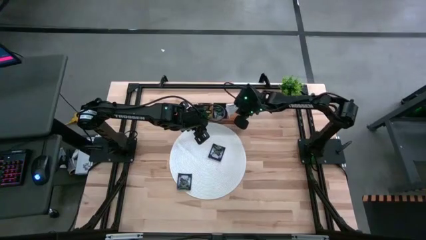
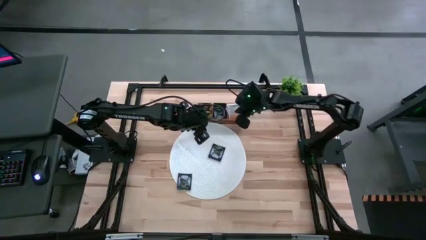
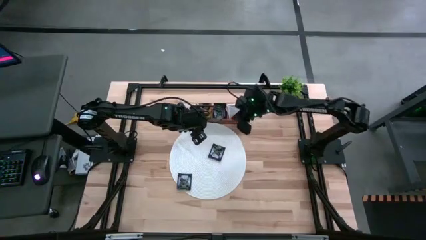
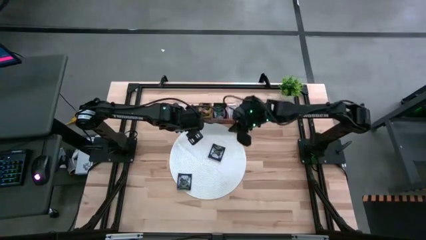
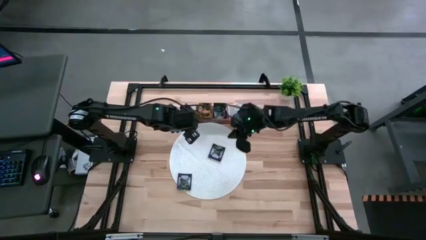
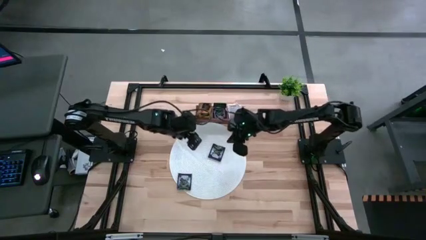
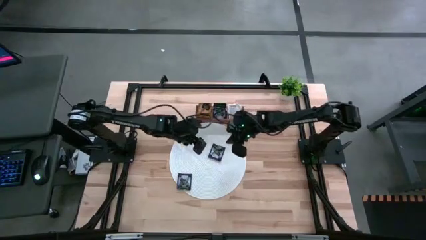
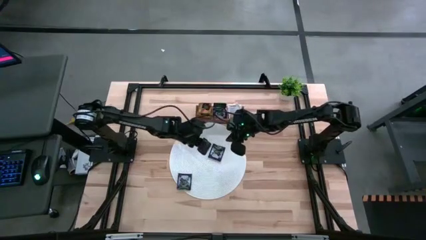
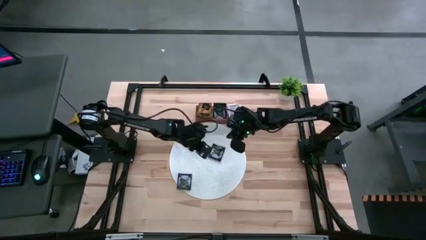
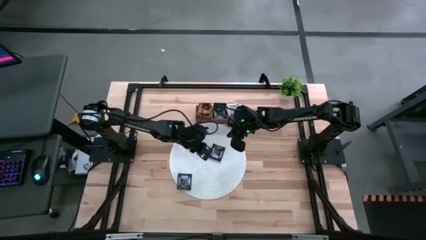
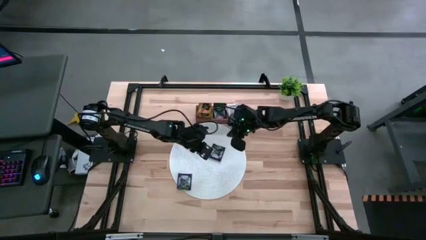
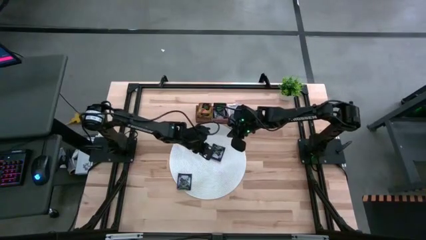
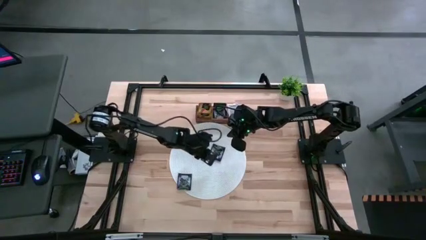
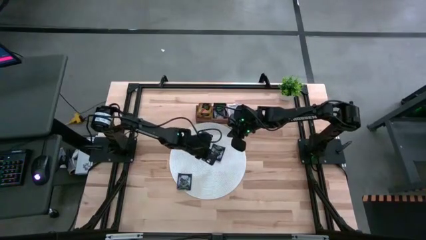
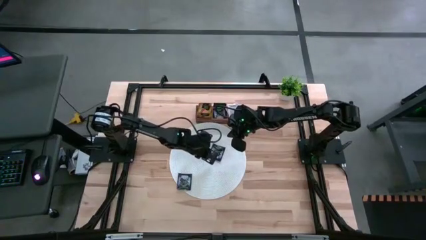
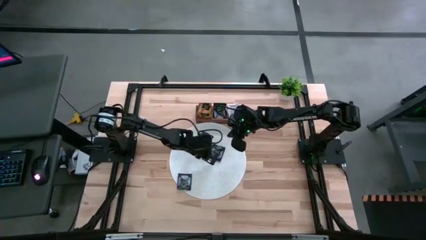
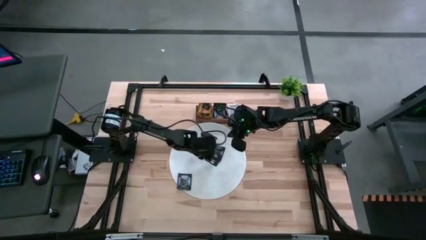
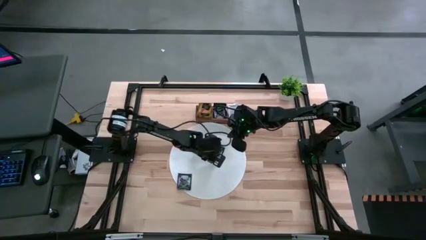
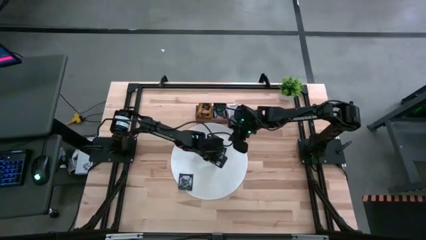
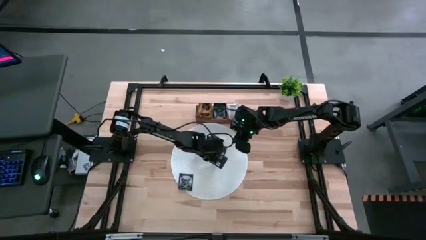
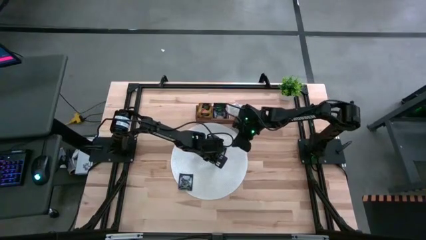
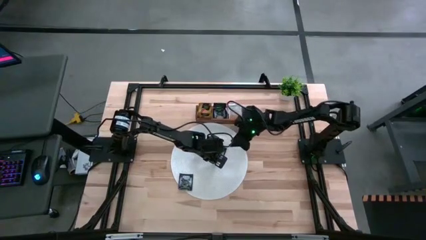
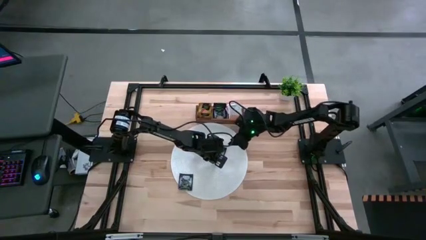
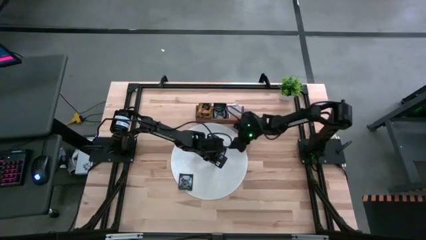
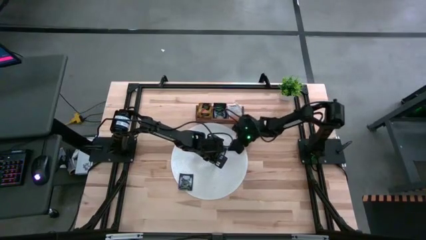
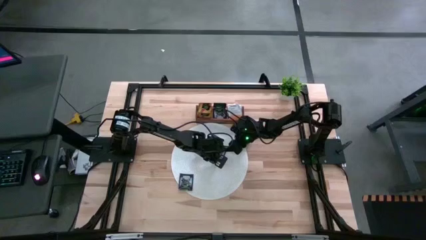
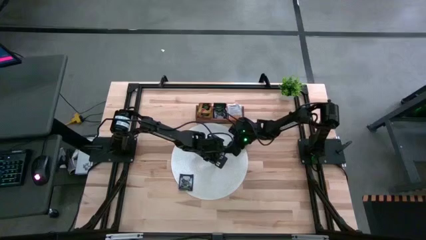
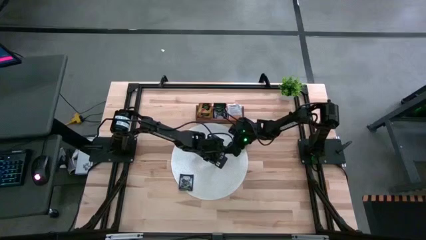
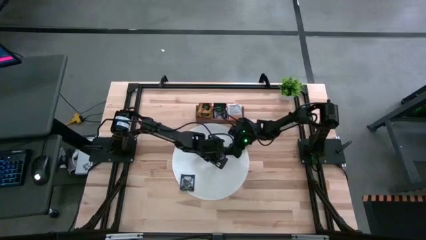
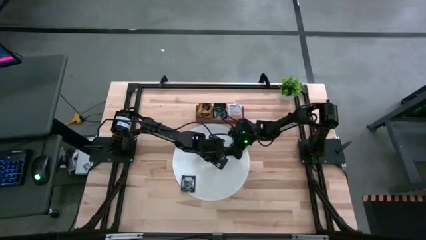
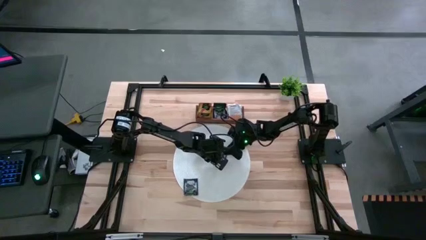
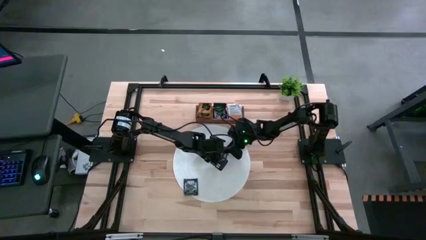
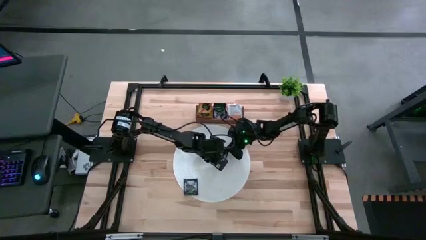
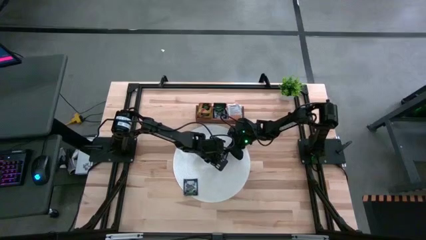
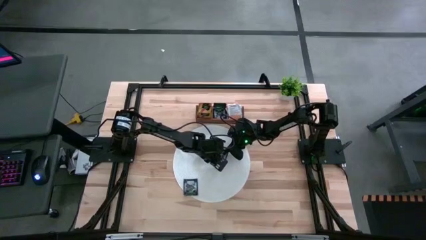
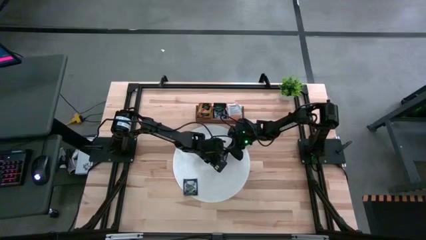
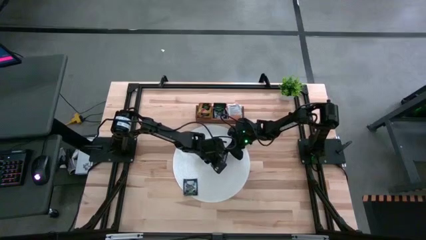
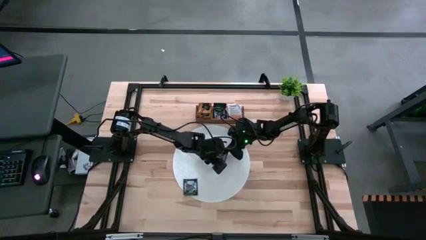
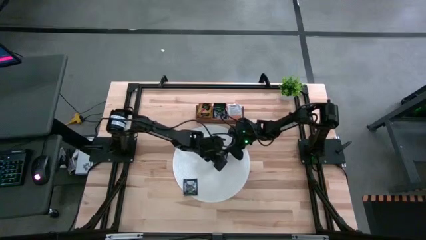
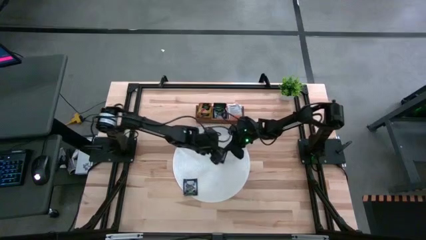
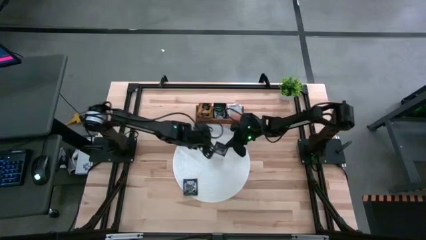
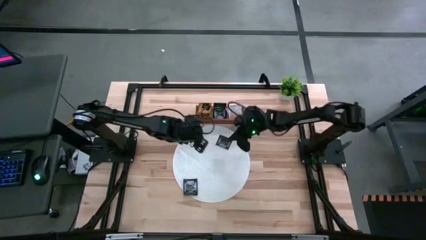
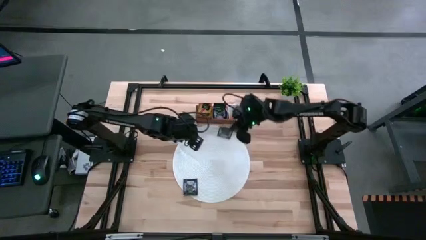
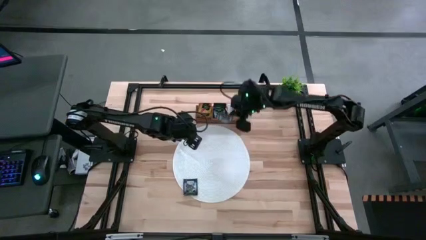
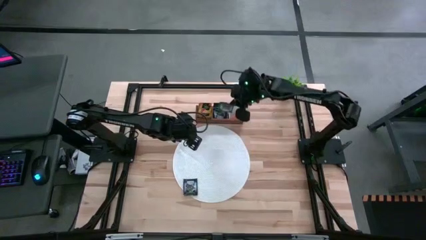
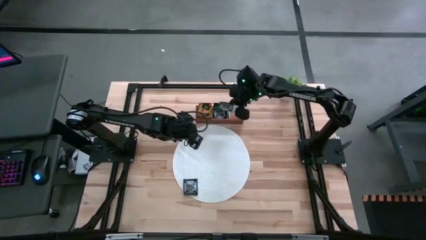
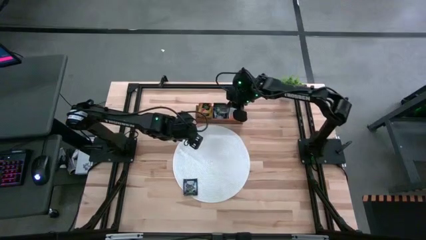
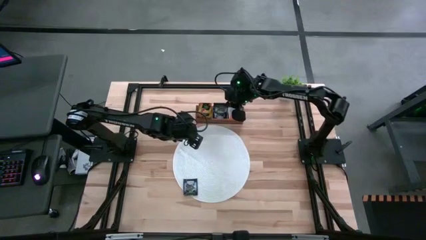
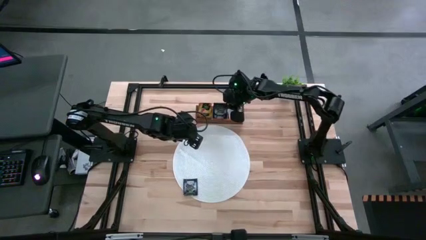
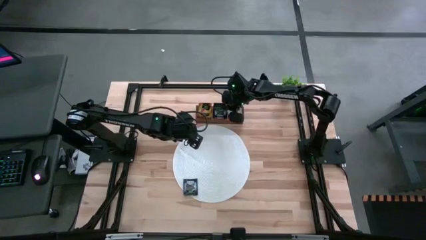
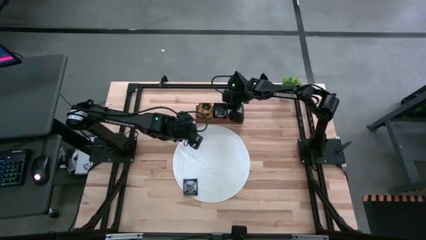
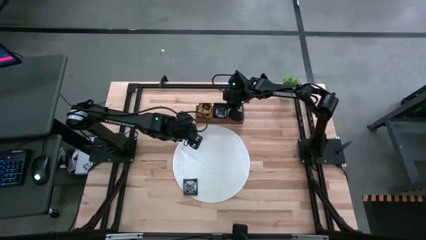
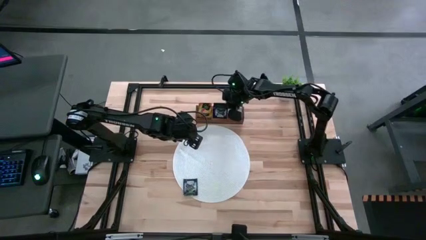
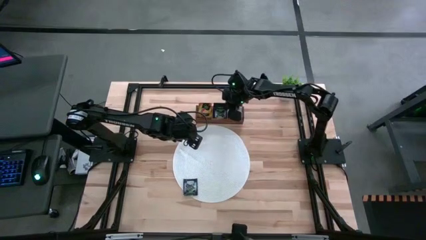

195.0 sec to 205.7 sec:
Task: Pick & Place Tea
Put the black tea bag into the middle section of the wooden organizer
